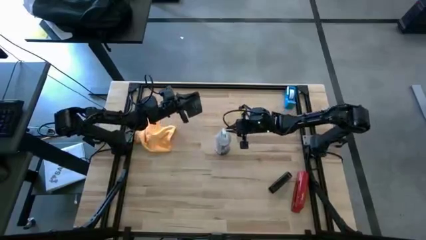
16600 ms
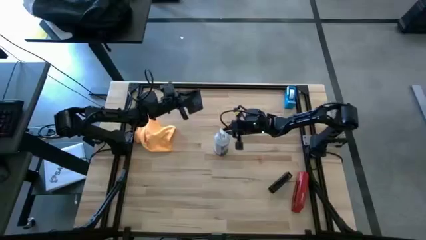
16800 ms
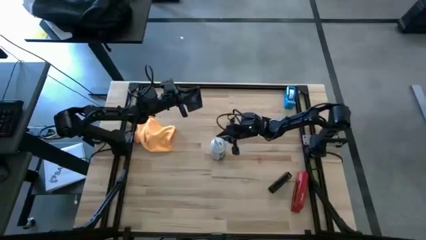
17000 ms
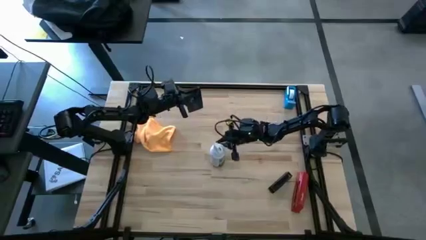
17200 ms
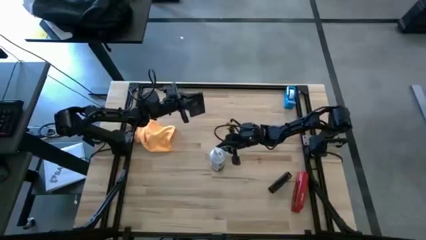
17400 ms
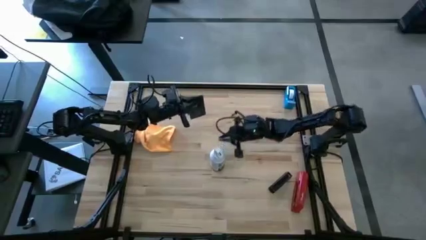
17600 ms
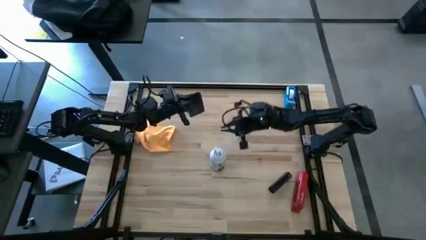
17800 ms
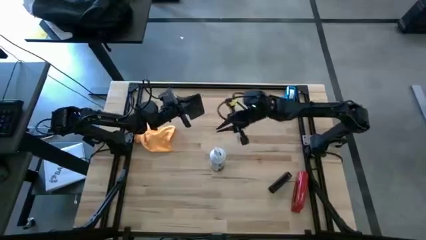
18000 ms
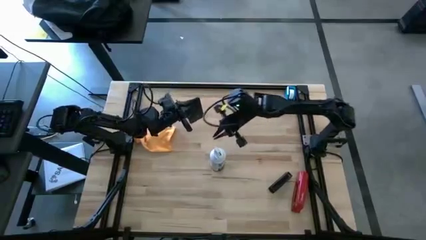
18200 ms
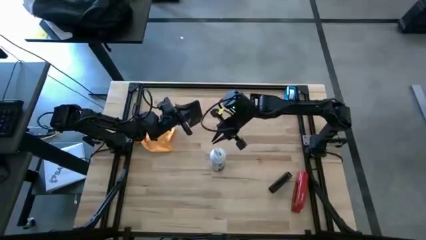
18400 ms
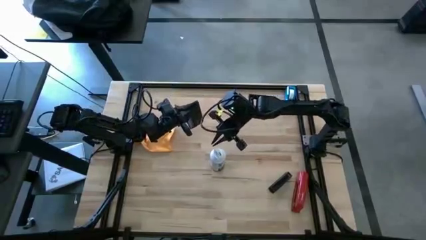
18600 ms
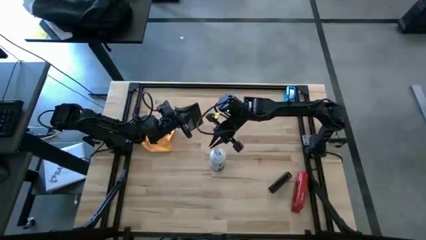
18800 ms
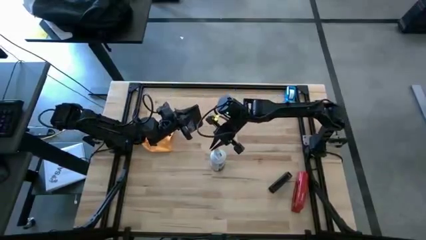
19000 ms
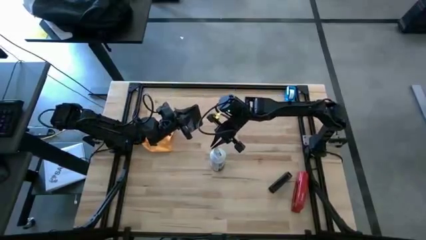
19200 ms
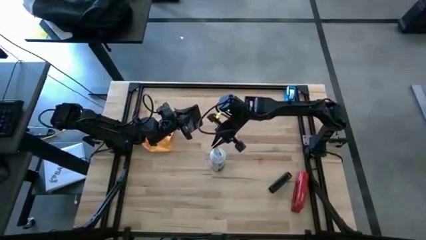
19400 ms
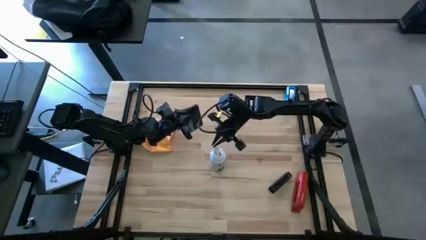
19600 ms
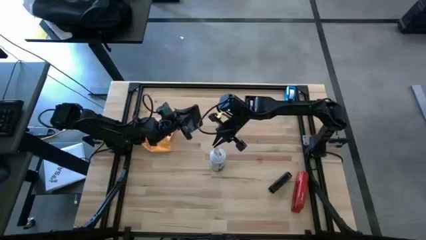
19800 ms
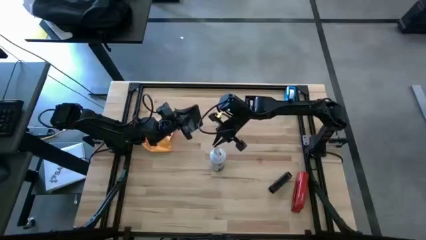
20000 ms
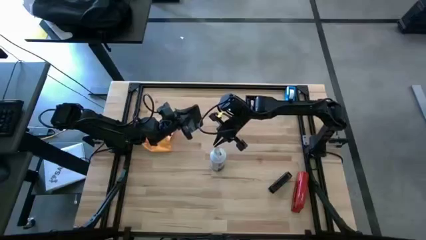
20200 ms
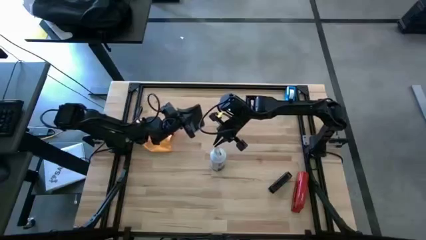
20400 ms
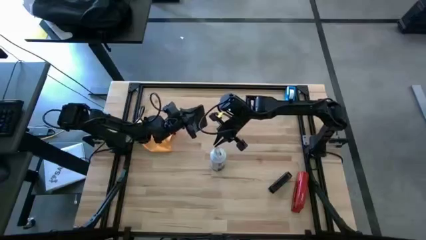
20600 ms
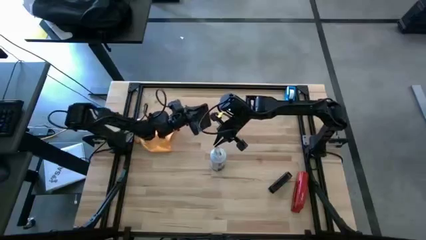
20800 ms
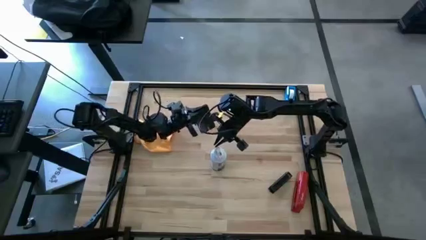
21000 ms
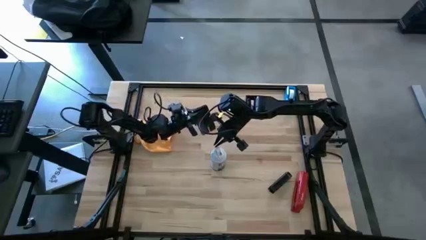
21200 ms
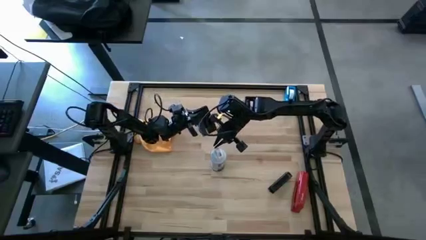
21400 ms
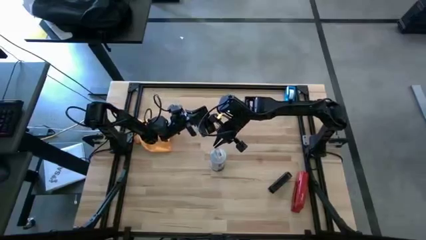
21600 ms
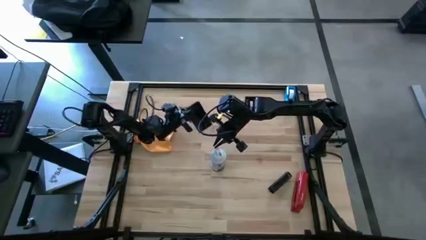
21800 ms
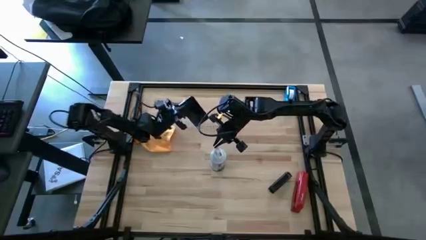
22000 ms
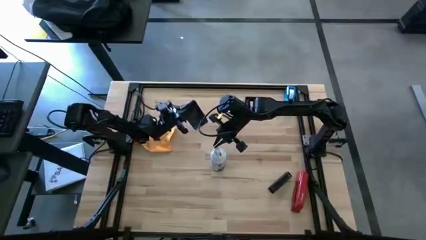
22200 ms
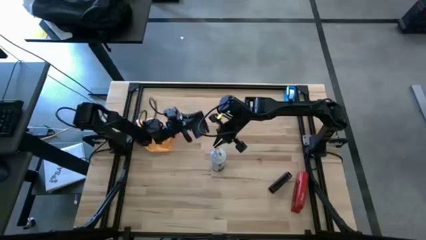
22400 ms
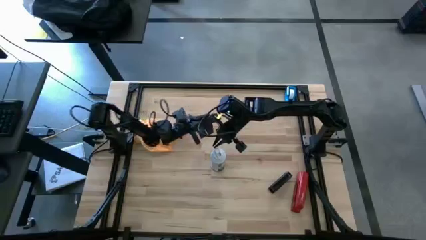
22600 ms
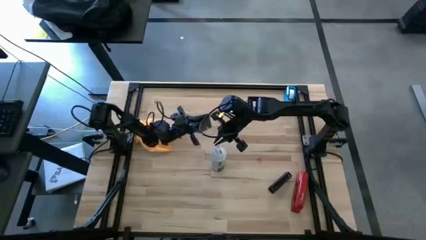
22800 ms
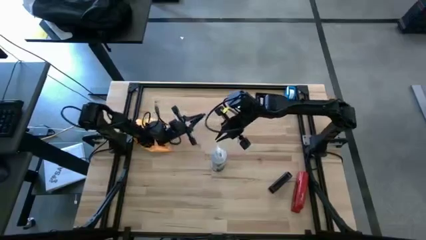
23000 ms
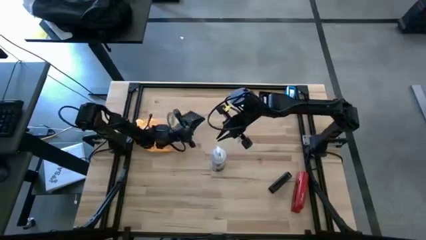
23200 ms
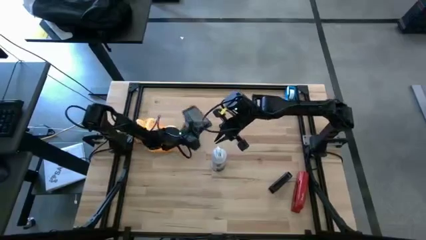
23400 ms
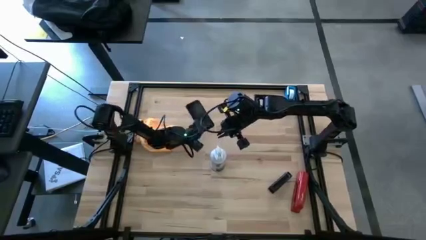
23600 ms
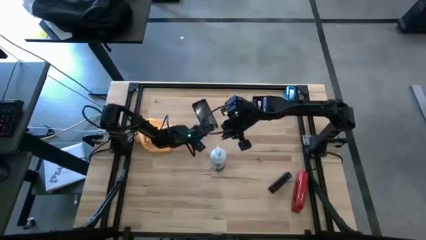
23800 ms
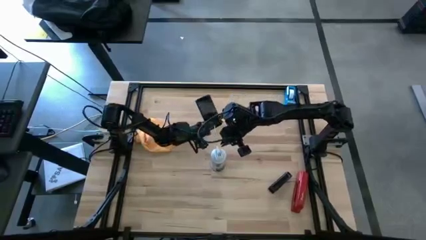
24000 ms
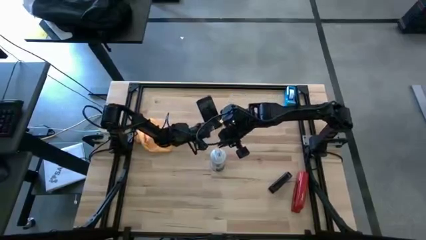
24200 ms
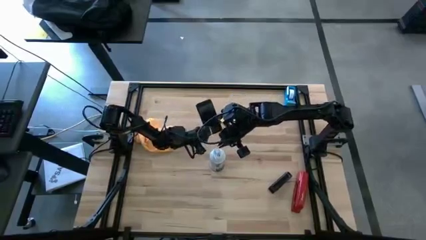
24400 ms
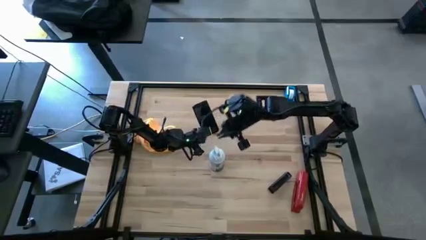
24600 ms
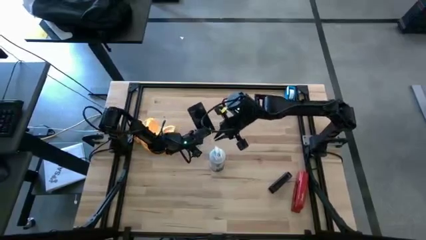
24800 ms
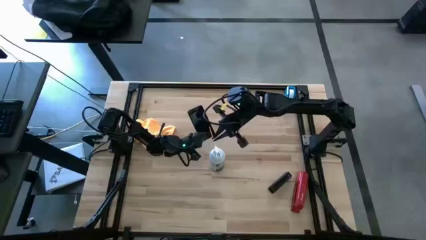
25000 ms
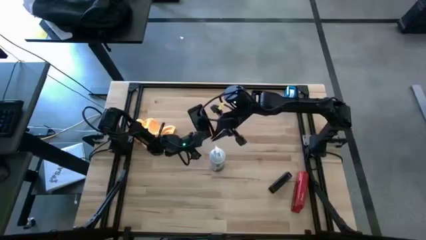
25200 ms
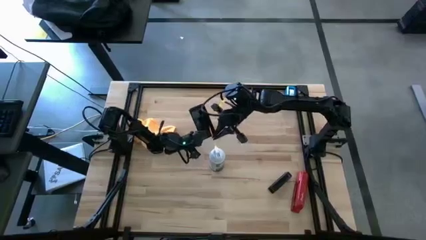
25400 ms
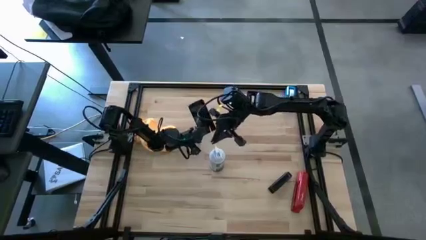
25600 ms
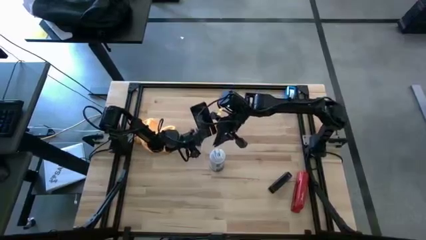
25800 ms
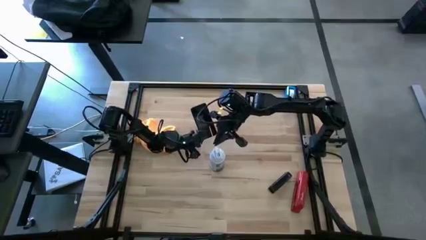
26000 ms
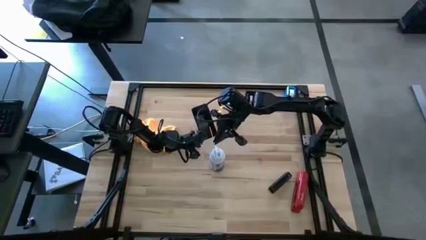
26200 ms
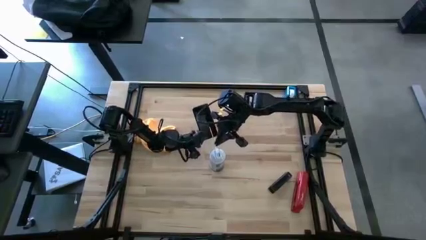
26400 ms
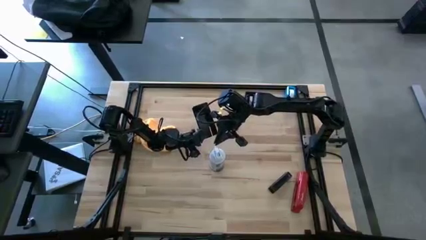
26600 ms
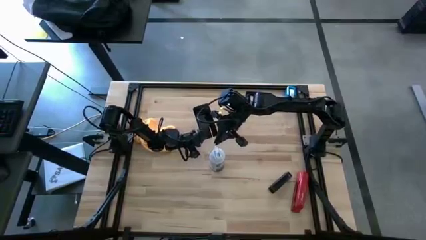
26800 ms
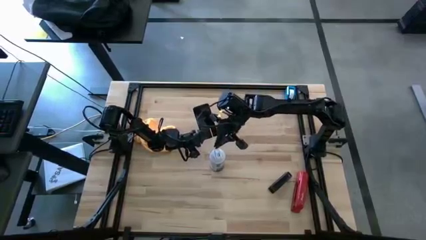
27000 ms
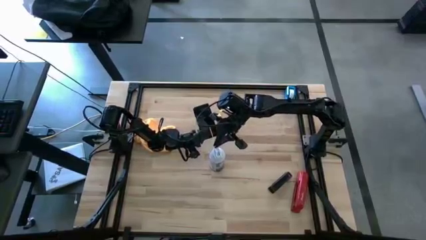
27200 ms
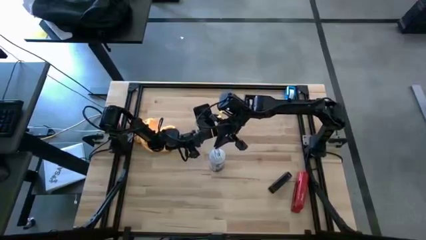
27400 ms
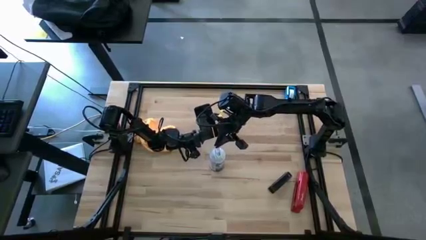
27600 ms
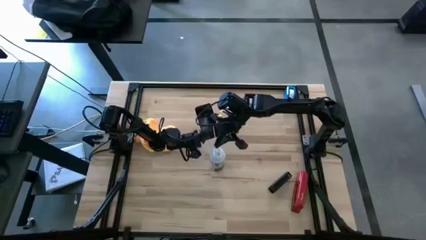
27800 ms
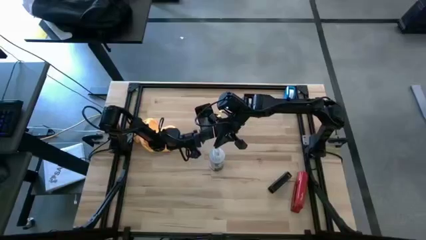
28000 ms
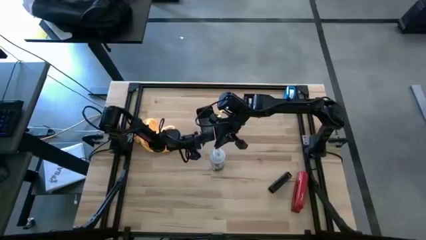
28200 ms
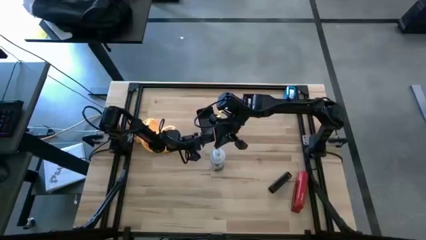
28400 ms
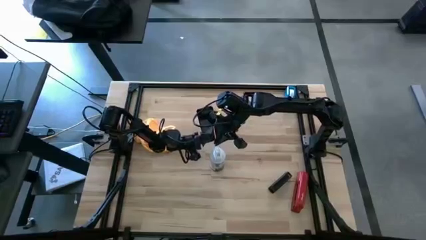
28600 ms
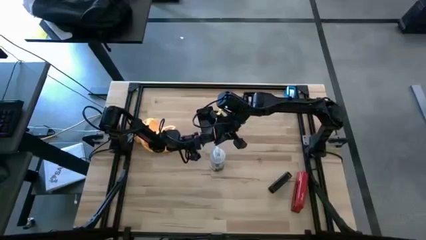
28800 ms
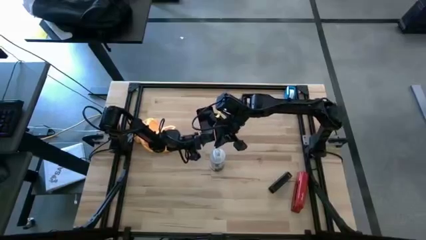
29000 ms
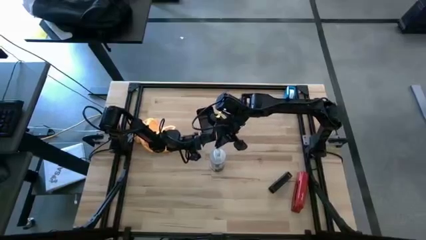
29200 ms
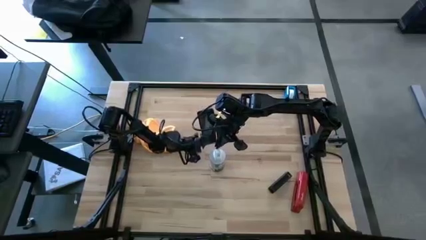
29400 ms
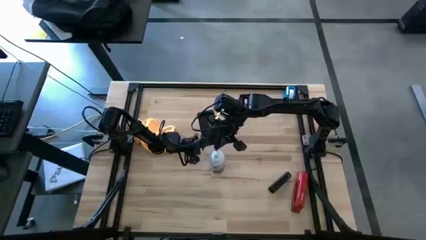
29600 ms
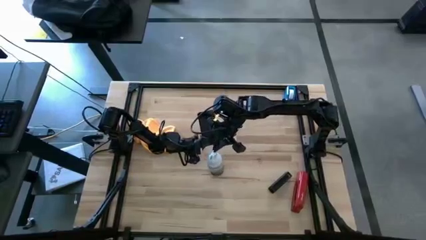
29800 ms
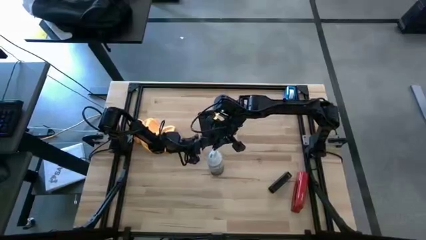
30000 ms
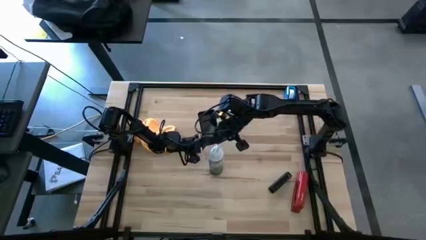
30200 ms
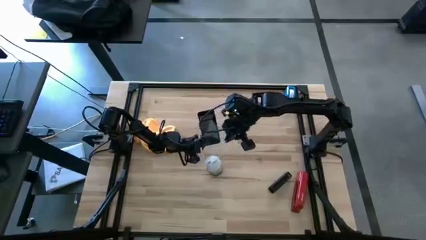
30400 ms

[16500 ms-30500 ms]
Task: Apply microfiber cloth
Spray the front of the cellphone using the white spray bottle
